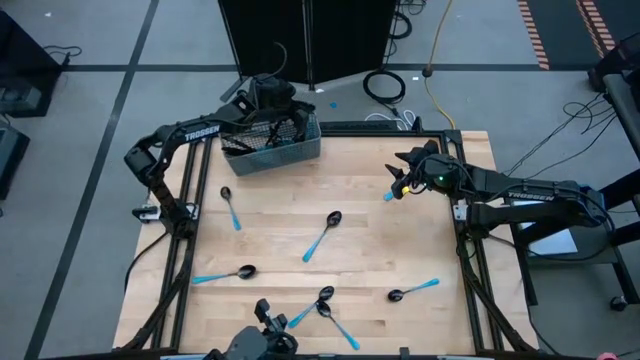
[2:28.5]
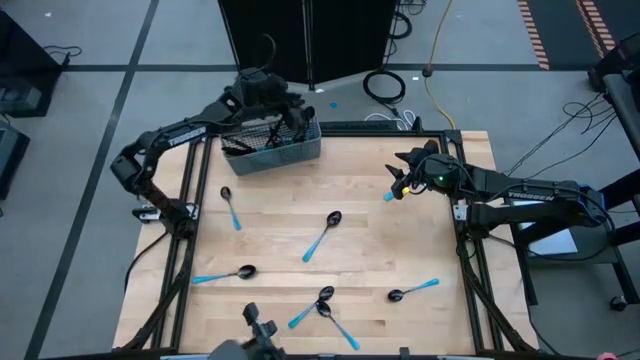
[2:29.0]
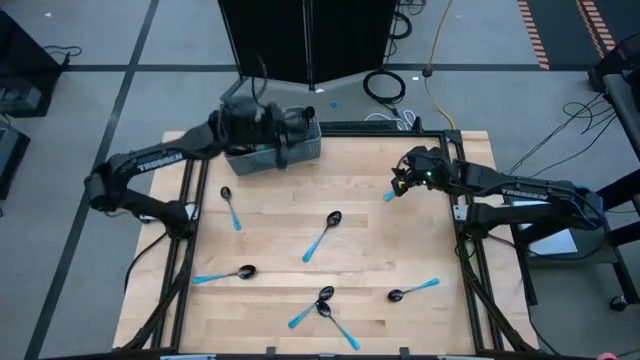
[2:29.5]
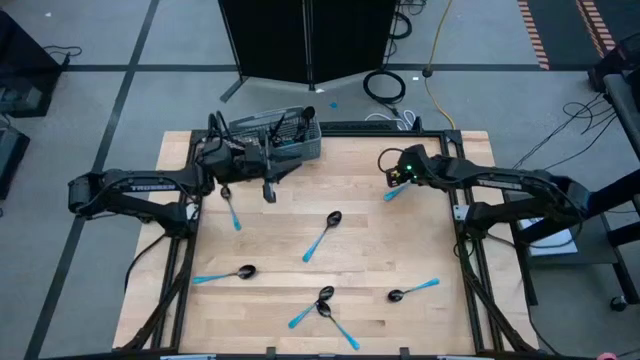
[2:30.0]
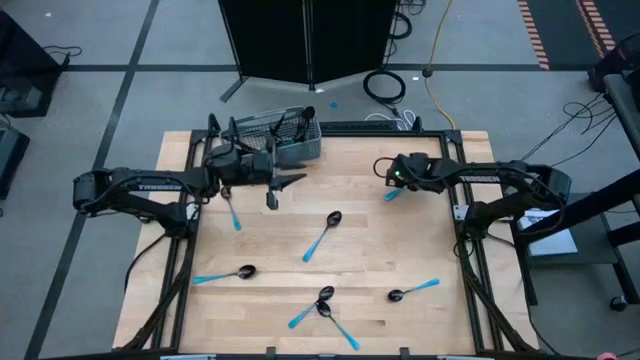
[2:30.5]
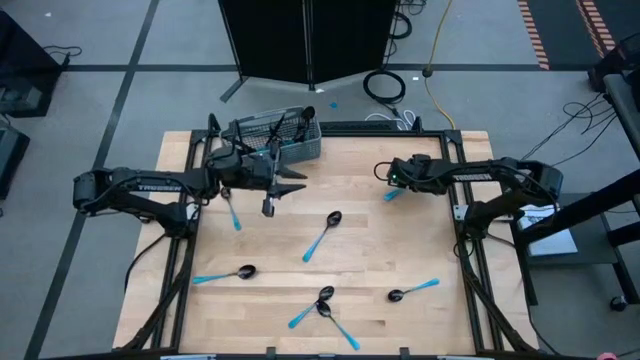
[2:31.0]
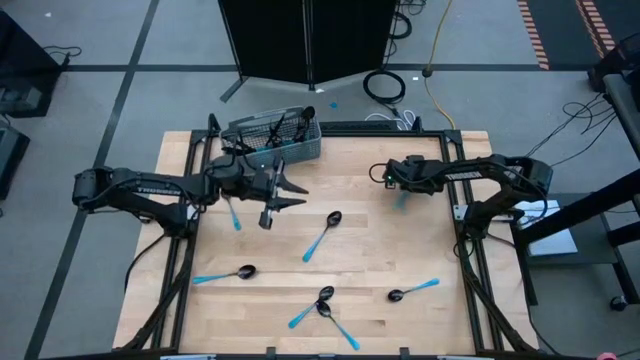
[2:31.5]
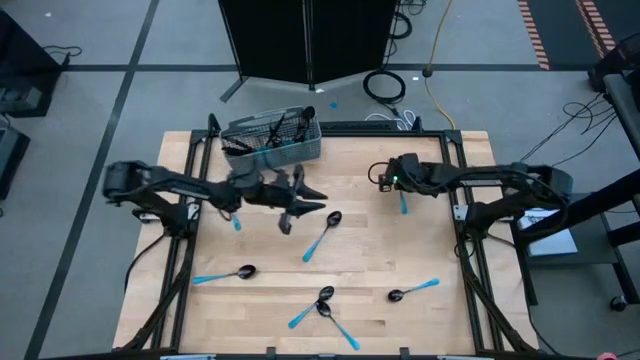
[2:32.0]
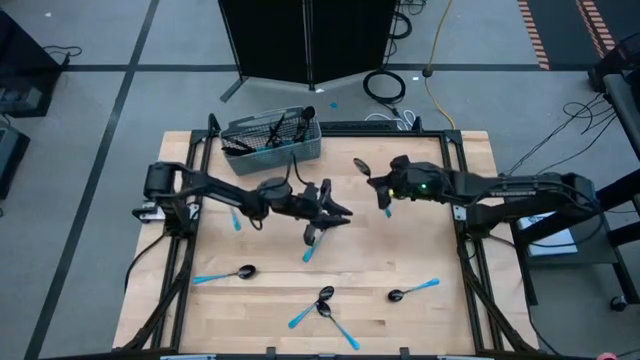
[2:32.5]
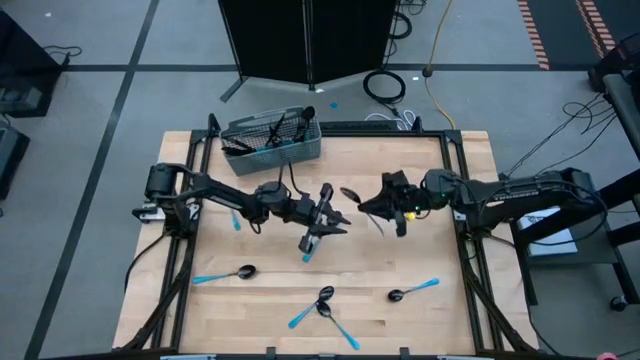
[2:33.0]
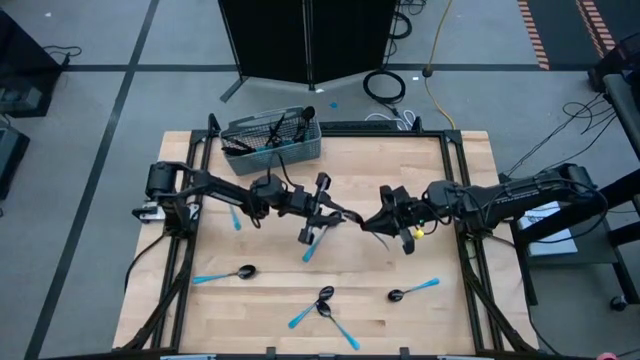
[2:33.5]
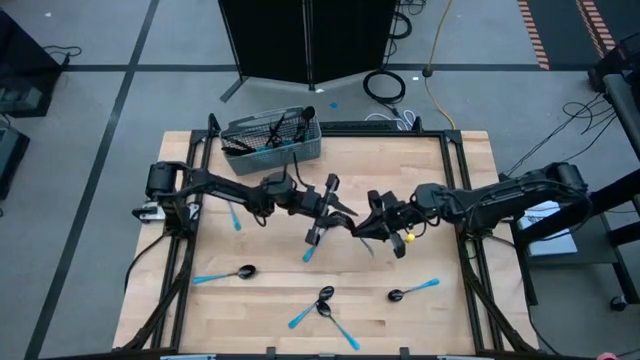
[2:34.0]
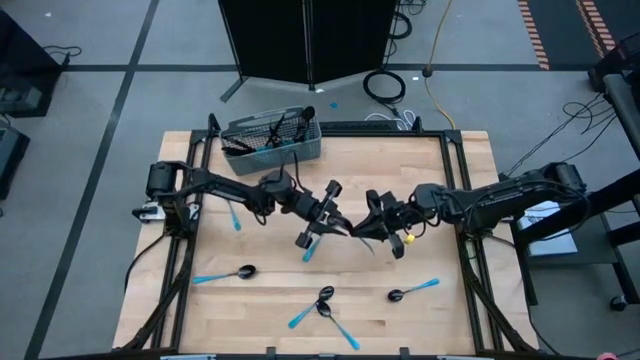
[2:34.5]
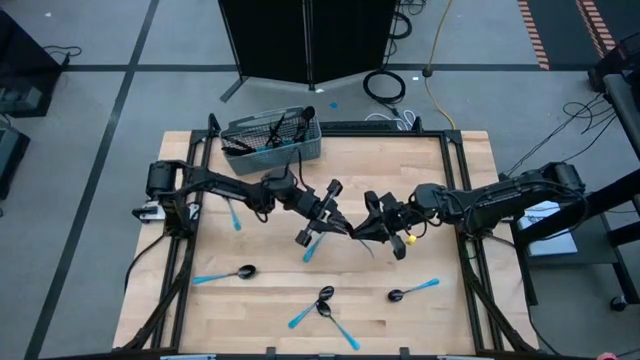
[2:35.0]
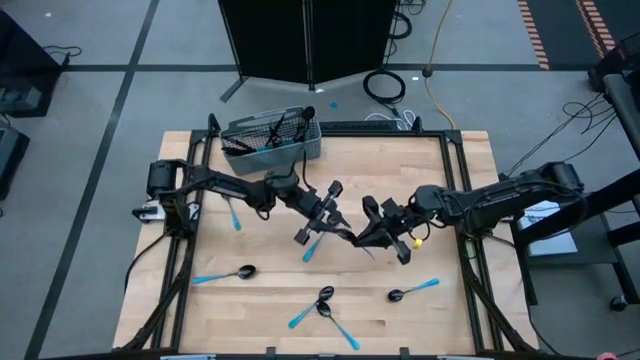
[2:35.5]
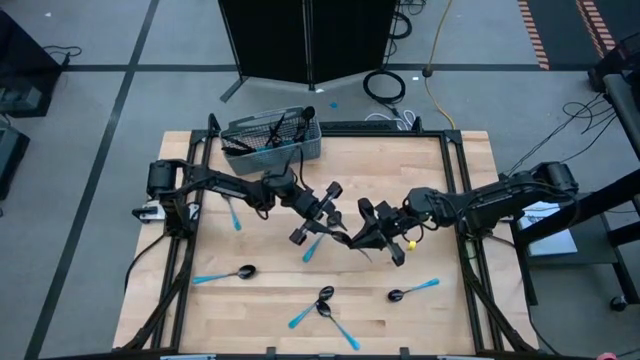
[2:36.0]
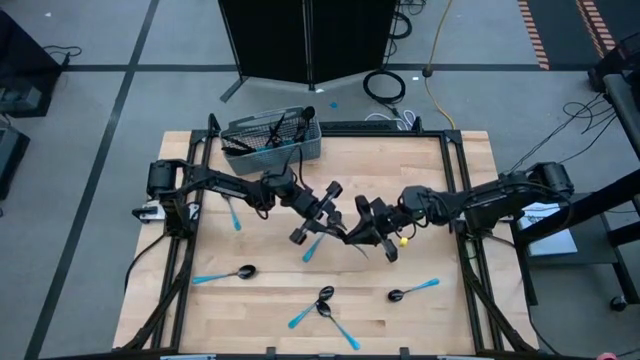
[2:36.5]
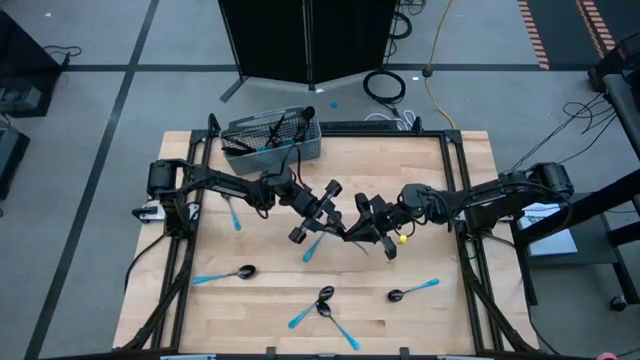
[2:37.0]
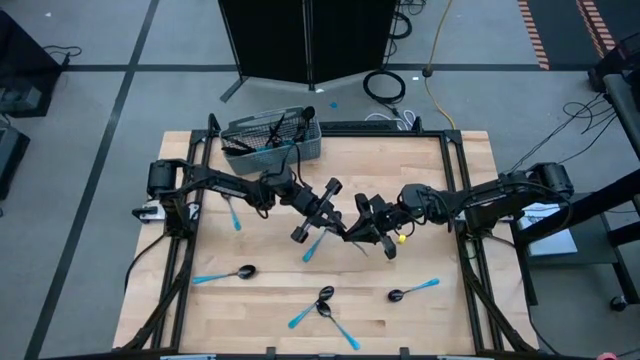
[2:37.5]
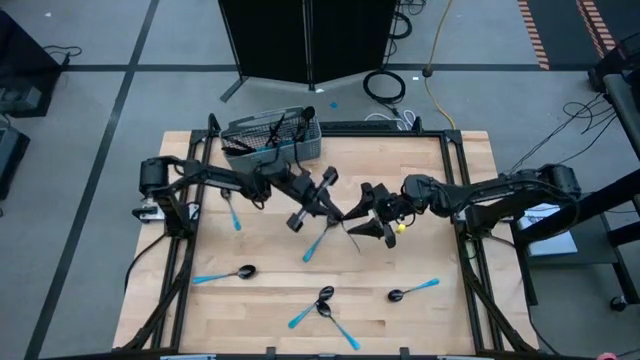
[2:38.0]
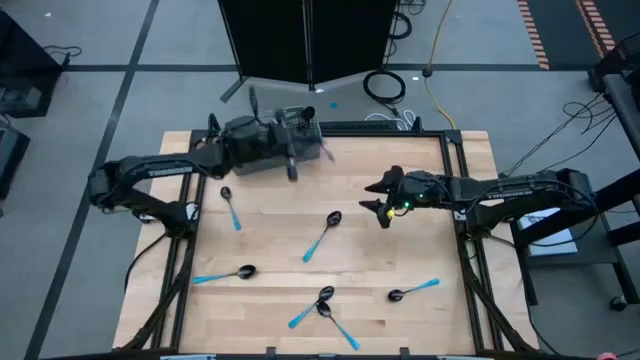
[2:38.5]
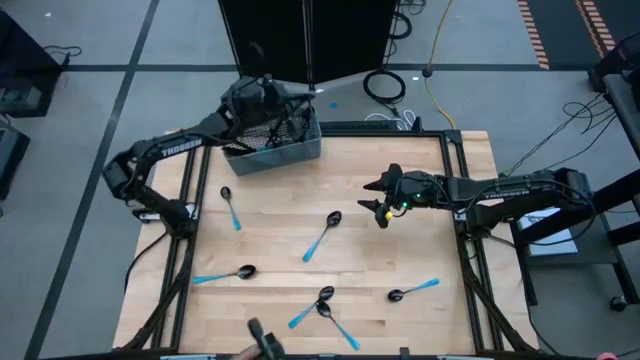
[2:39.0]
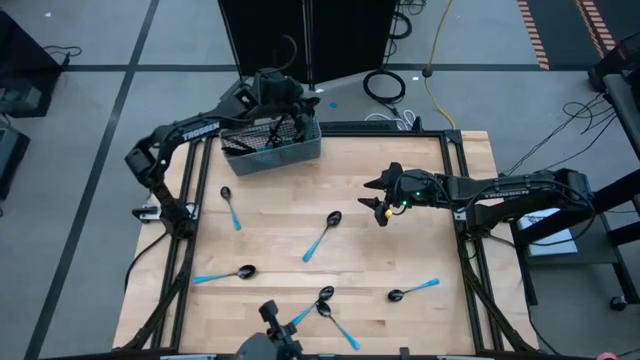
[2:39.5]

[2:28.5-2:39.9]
Task: Sort silverware
Put the blue spoon into the silverware basket

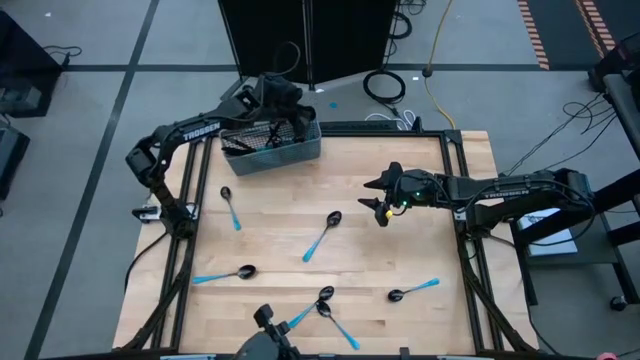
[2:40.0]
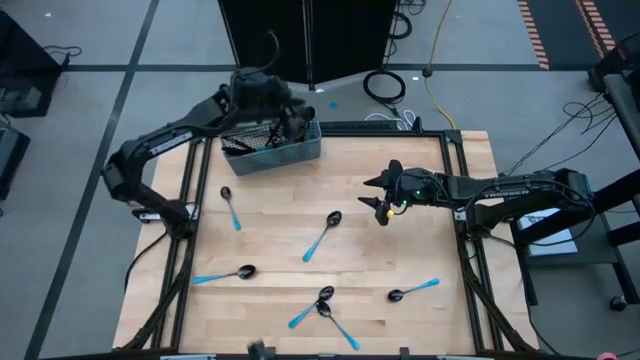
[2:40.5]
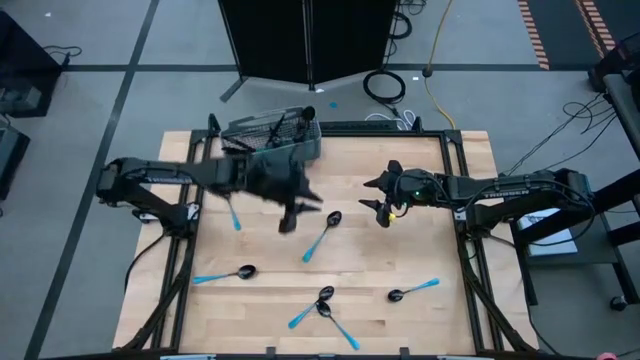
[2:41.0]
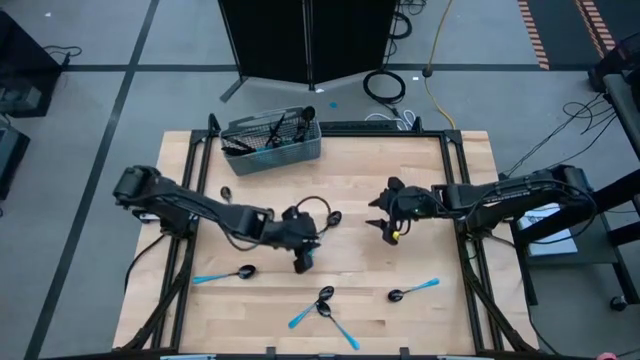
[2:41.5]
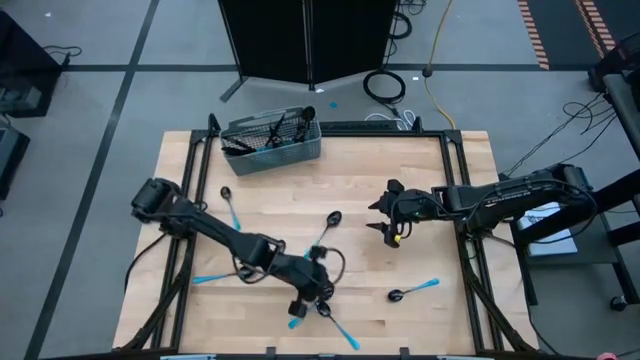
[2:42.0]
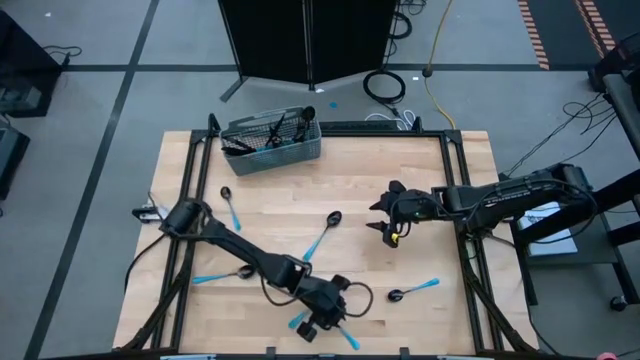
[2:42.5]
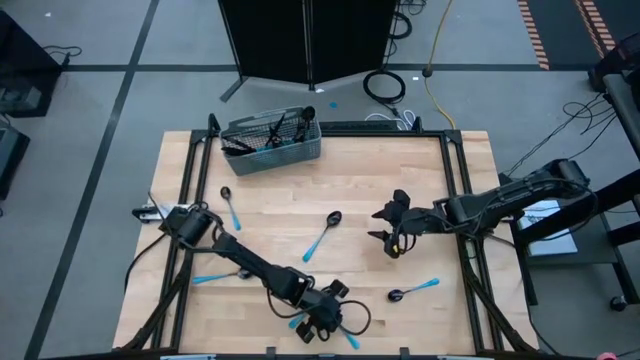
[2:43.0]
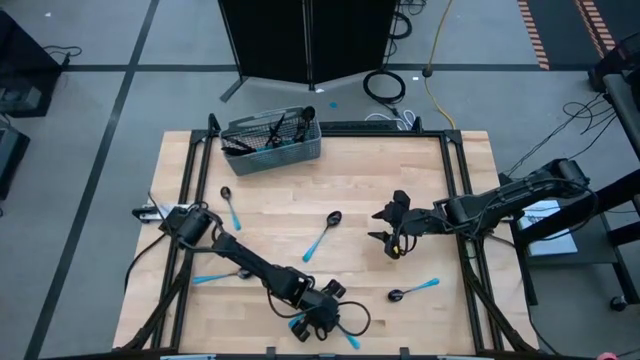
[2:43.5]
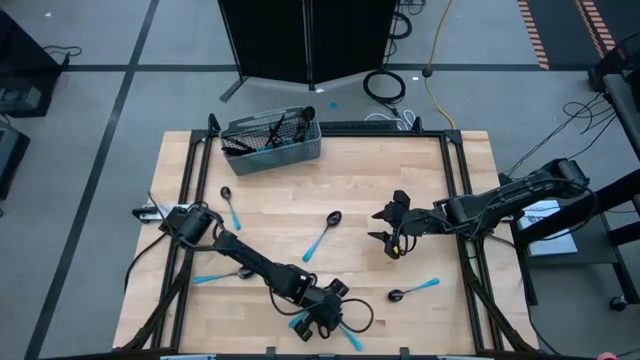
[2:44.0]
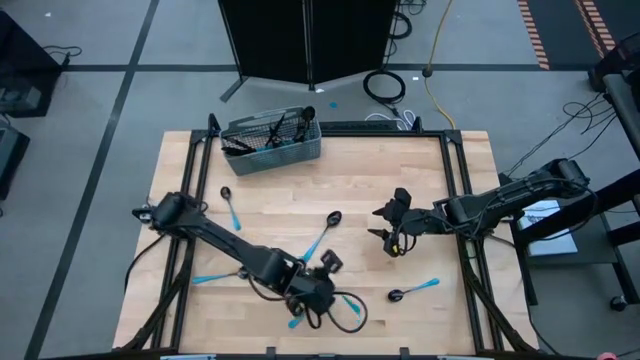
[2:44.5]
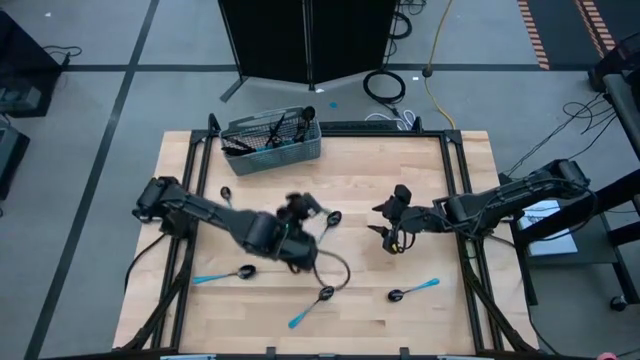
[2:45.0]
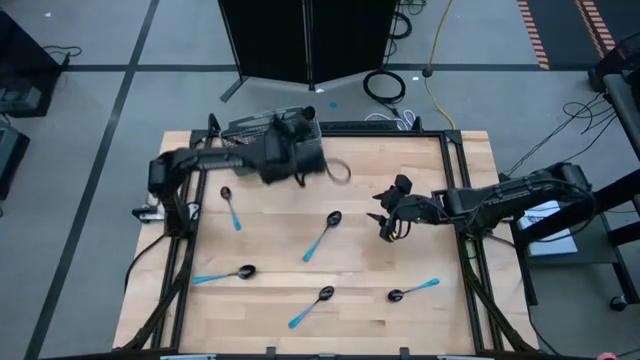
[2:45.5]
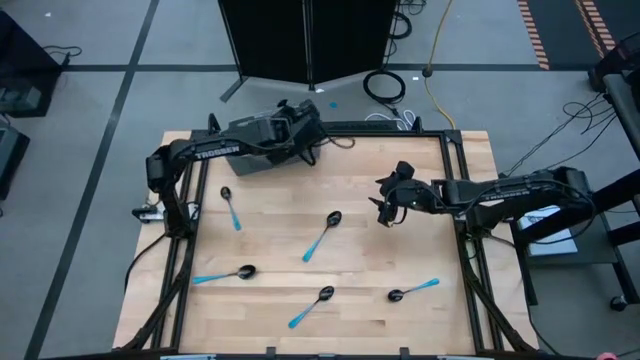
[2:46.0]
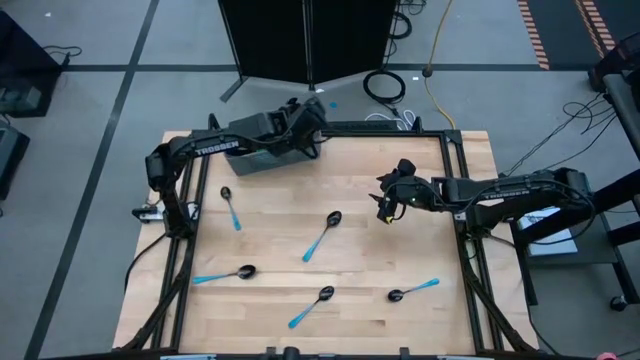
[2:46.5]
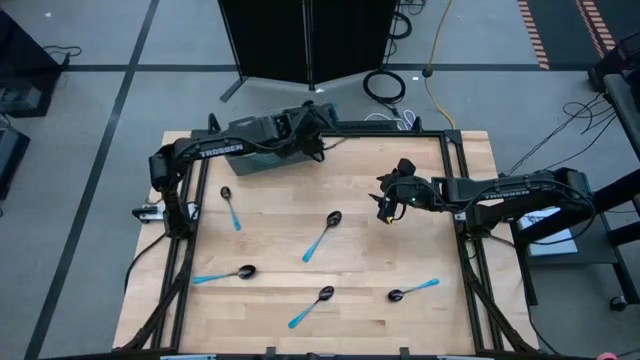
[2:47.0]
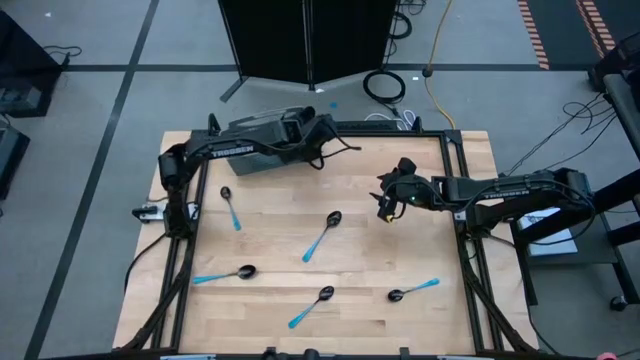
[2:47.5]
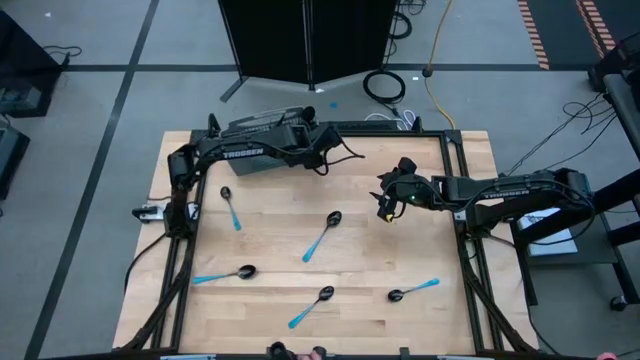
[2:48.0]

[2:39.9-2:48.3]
Put the blue spoon into the silverware basket
